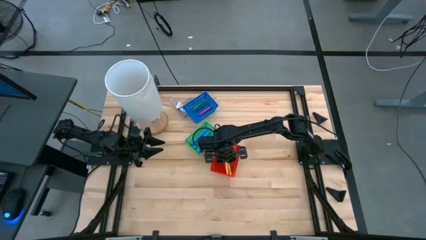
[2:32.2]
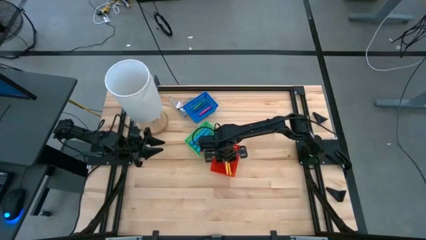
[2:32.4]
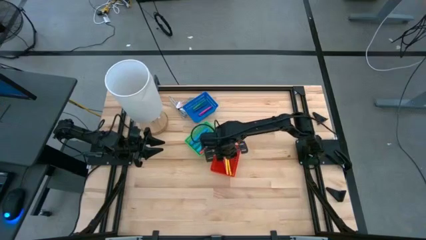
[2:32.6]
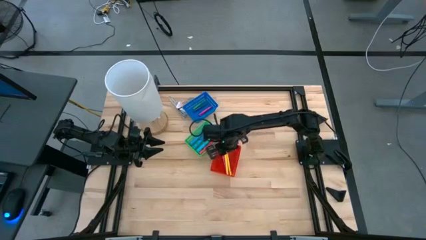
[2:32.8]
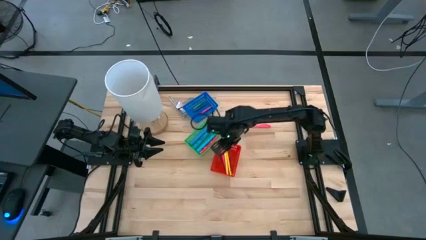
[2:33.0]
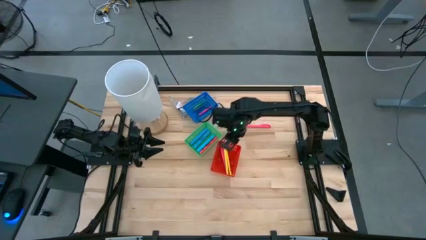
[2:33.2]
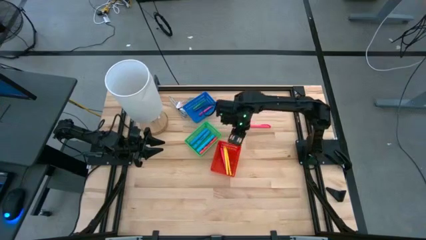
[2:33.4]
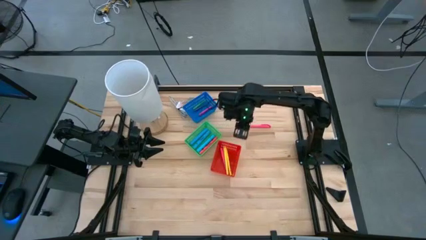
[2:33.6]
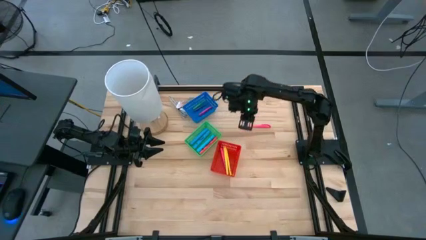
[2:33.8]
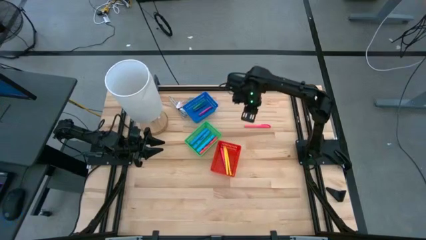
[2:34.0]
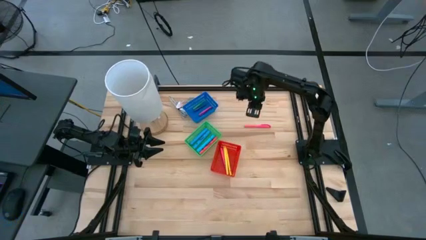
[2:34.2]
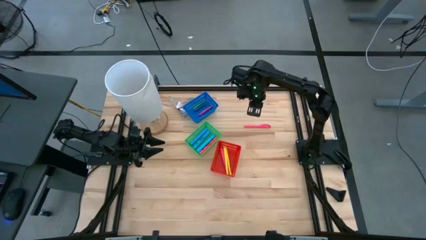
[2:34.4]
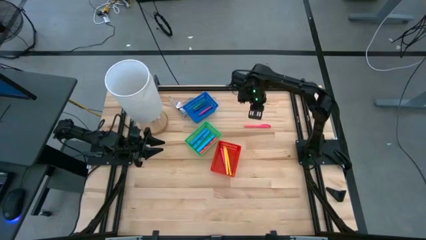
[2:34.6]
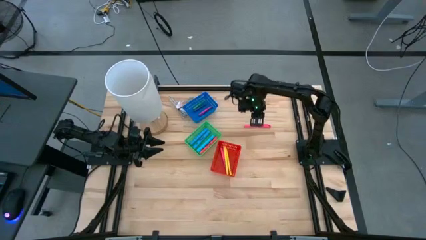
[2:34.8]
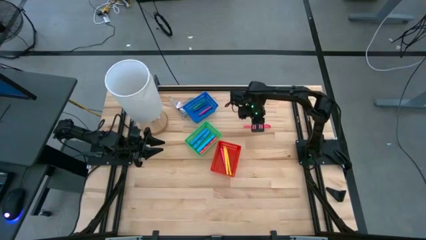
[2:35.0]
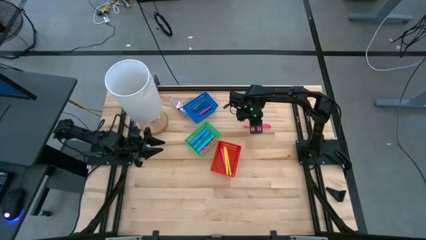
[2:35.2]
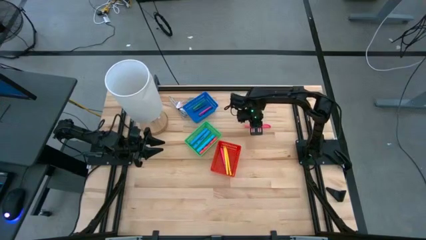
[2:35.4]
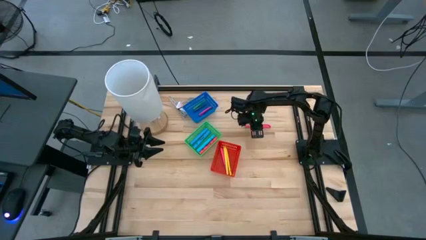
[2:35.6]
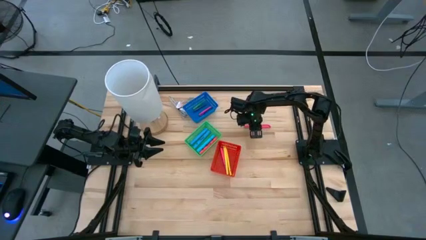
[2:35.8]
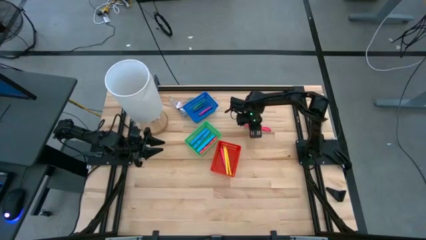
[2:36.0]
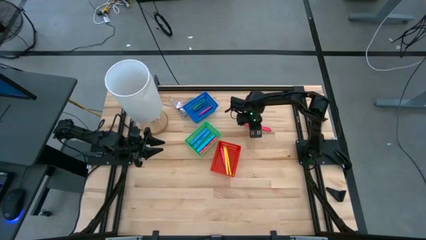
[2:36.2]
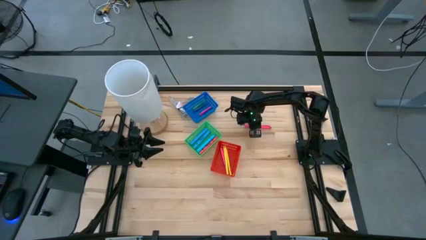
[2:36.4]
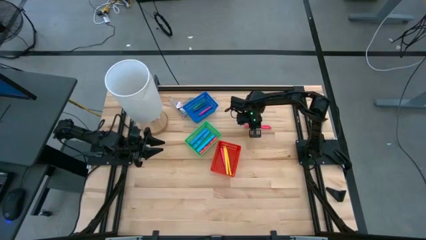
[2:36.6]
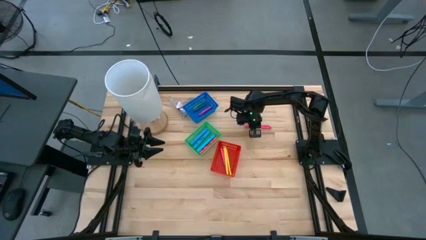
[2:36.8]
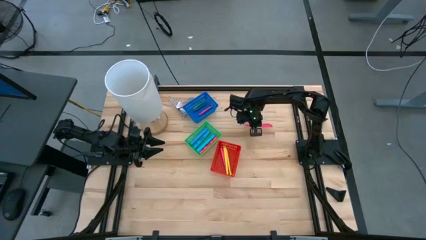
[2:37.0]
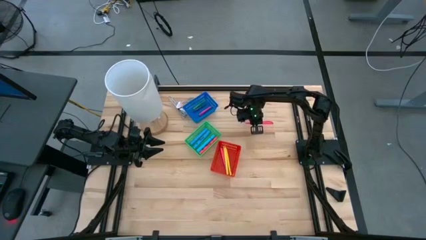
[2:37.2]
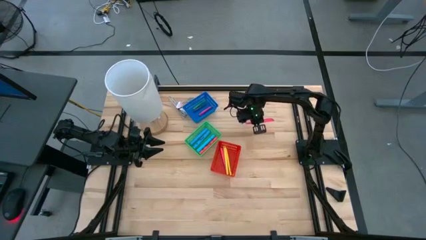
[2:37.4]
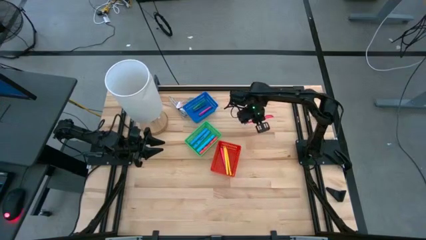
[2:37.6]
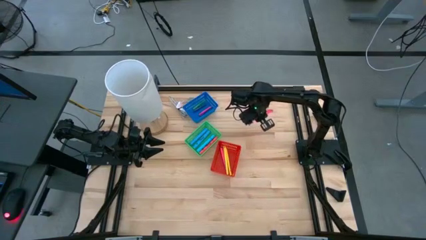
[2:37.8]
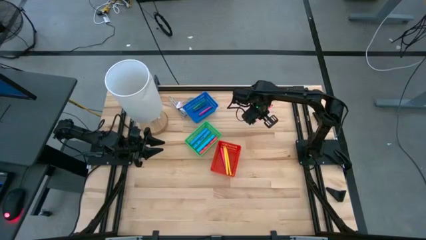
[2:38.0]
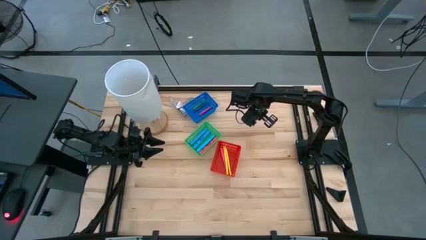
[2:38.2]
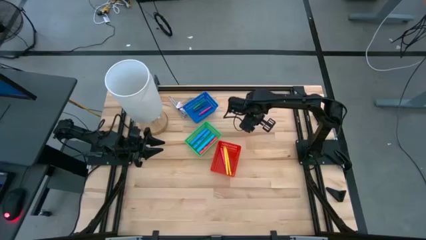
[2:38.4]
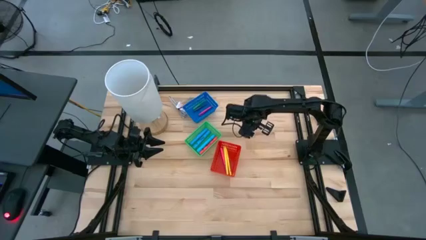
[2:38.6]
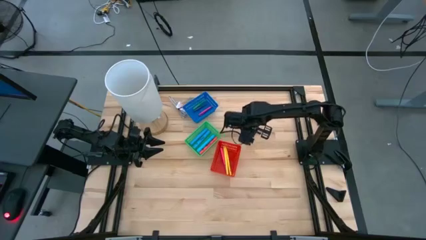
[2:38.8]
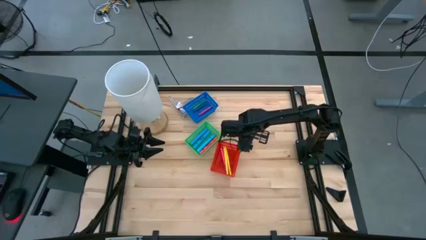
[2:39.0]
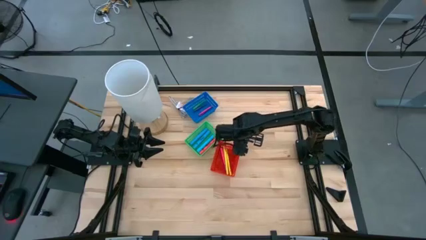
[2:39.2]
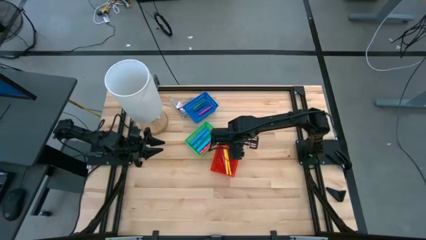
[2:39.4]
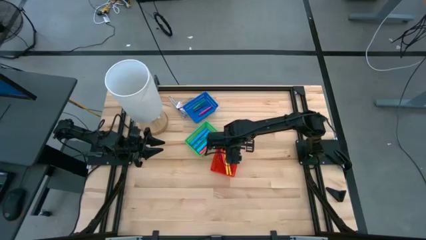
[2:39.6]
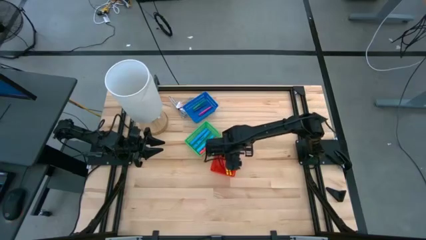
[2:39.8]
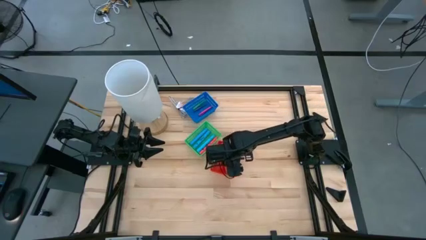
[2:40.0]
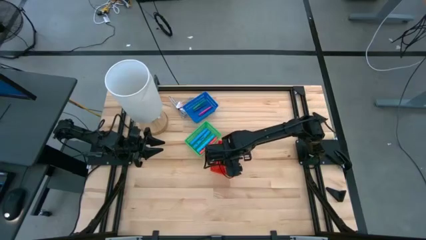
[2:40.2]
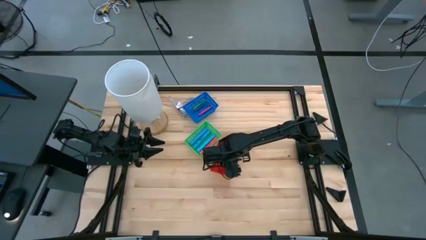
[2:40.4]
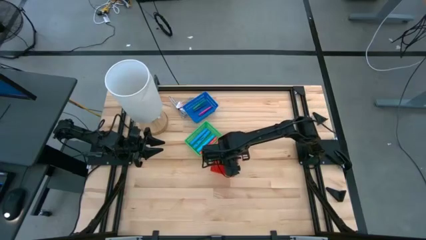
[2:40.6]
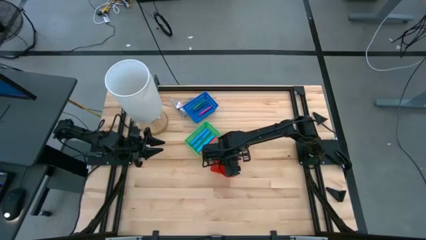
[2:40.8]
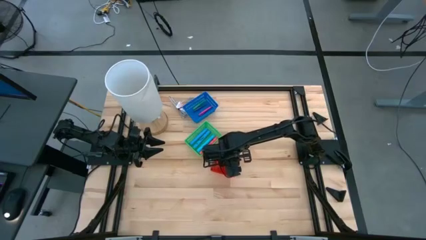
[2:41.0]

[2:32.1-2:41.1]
Task: Pick & Place Markers
Put the pink pen into the red bin

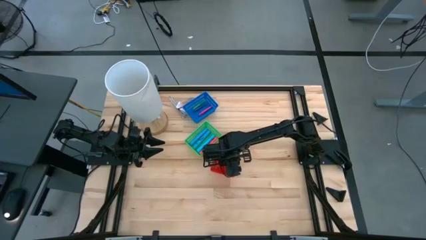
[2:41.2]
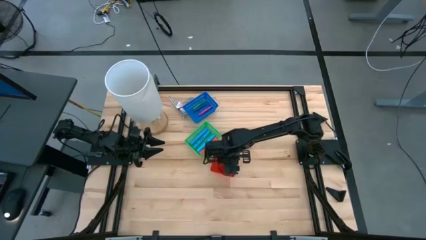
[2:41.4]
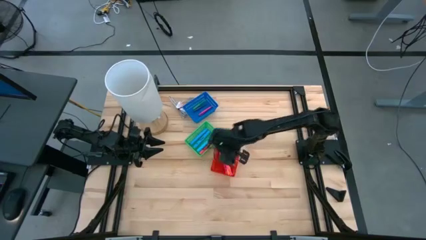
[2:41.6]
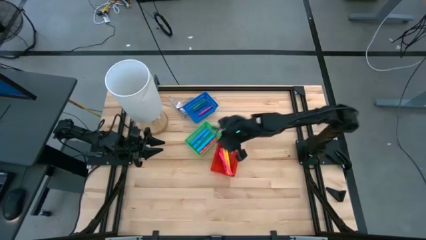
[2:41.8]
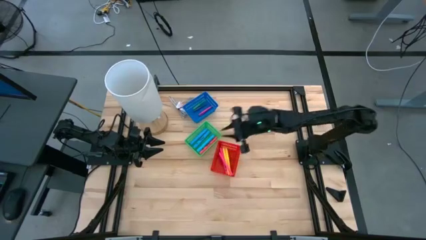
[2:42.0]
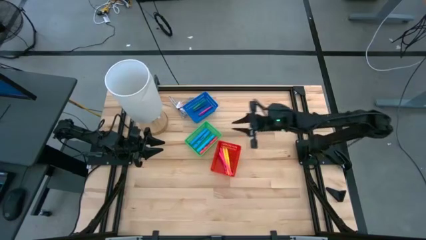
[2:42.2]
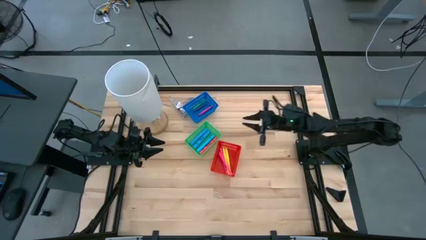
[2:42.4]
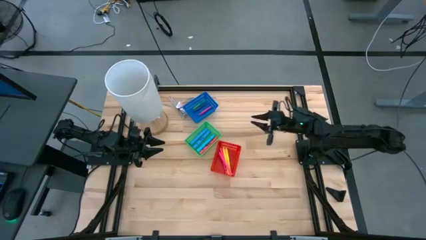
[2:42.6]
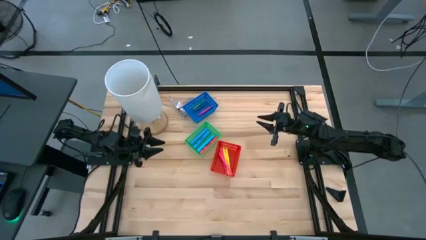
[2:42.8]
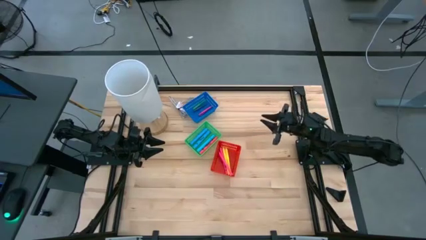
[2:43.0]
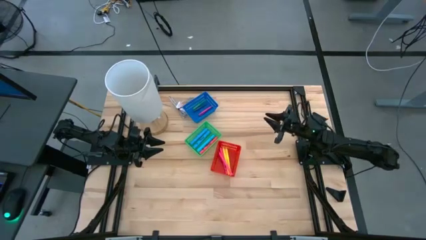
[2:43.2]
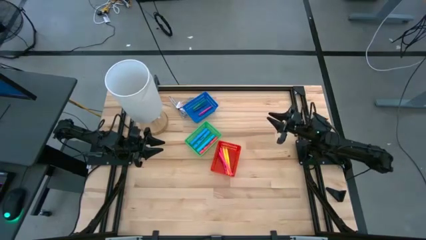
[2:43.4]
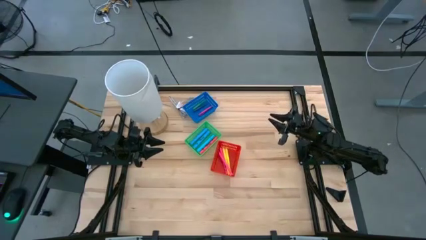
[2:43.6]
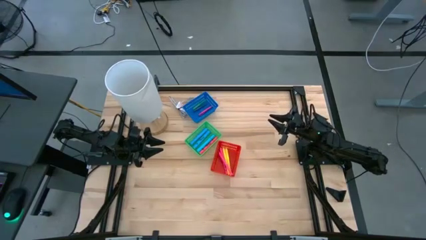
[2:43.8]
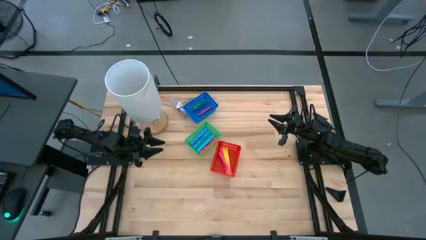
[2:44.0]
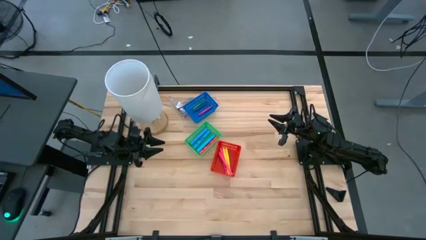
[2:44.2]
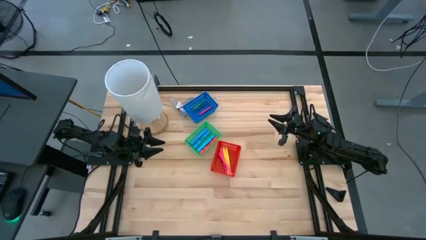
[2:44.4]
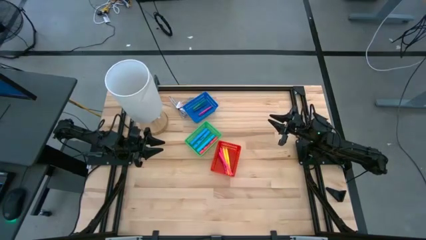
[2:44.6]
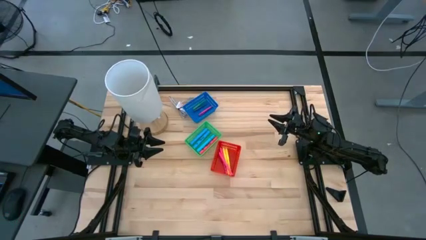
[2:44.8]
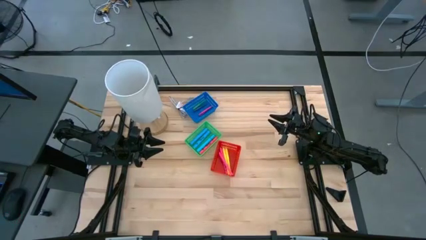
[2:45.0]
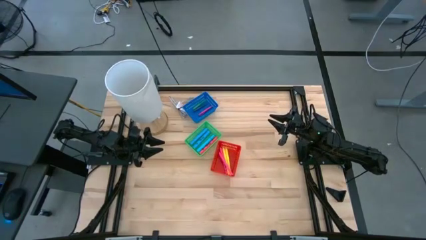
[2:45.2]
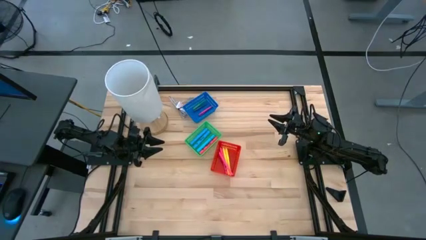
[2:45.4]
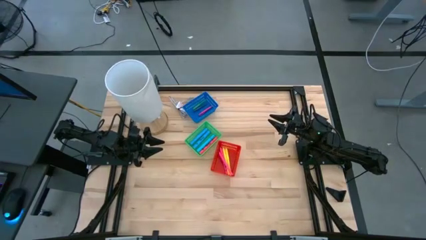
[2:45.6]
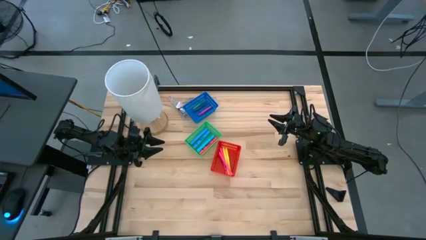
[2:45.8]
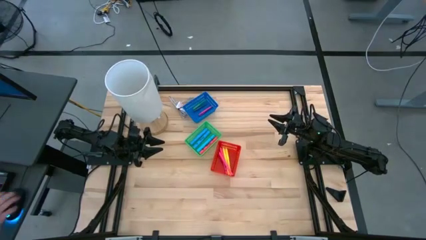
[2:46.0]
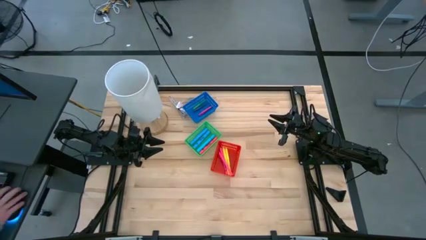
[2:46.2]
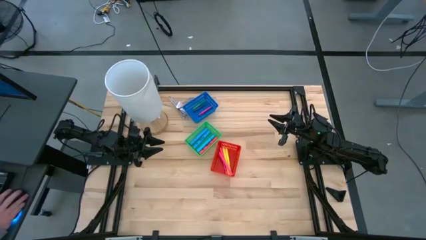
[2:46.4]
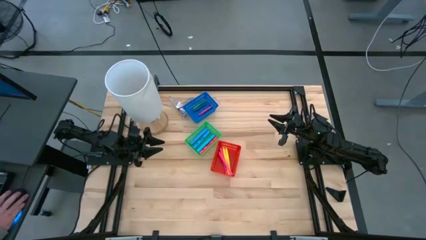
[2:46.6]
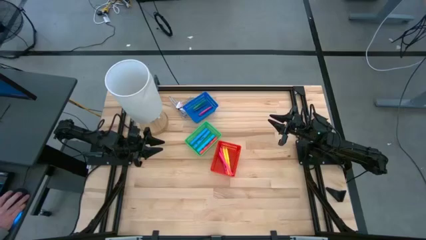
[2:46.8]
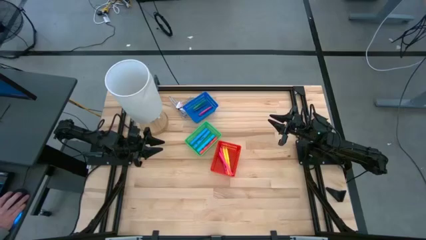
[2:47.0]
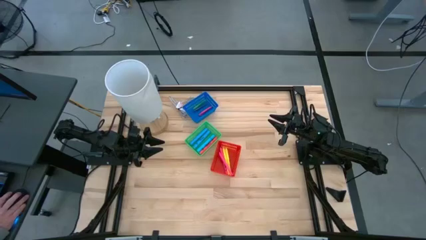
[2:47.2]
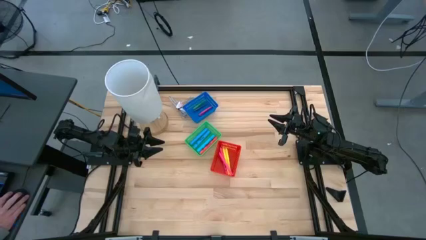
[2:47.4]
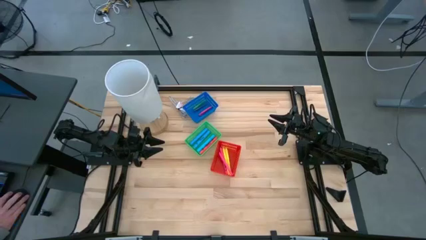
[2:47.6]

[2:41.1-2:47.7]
Return to Home Position
